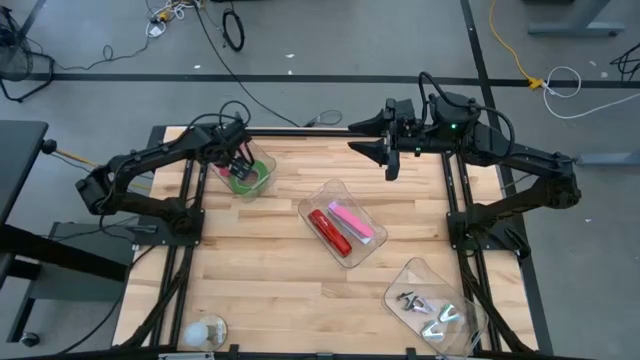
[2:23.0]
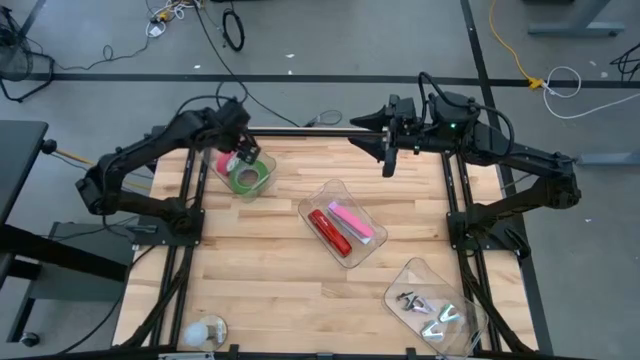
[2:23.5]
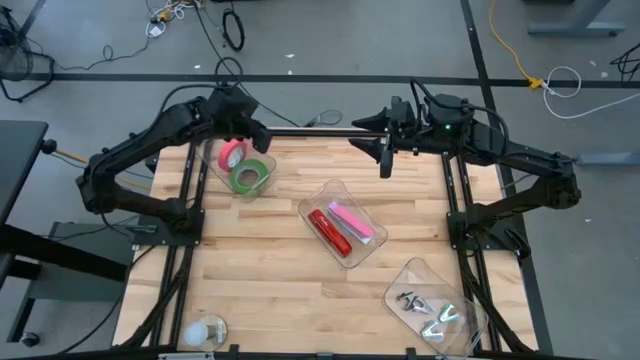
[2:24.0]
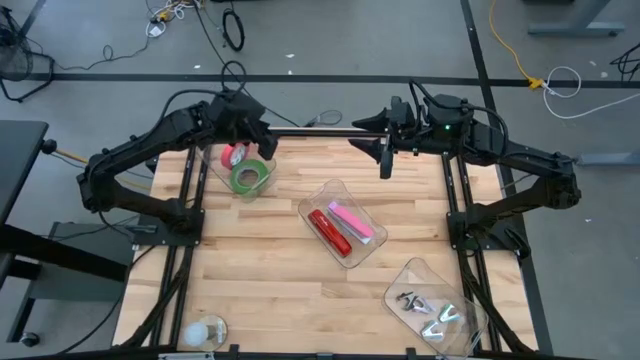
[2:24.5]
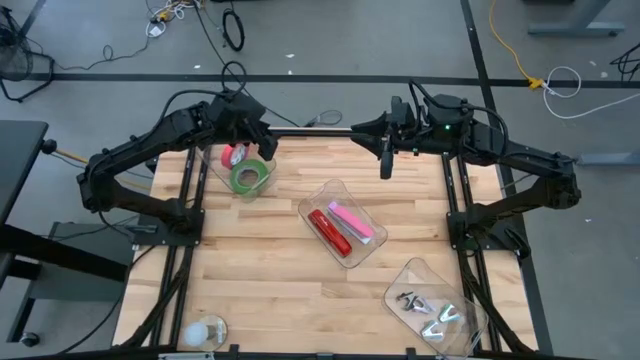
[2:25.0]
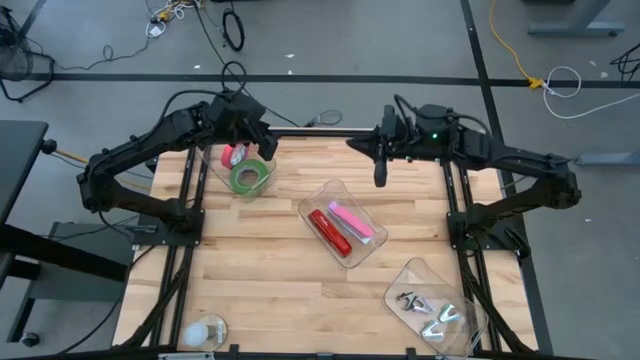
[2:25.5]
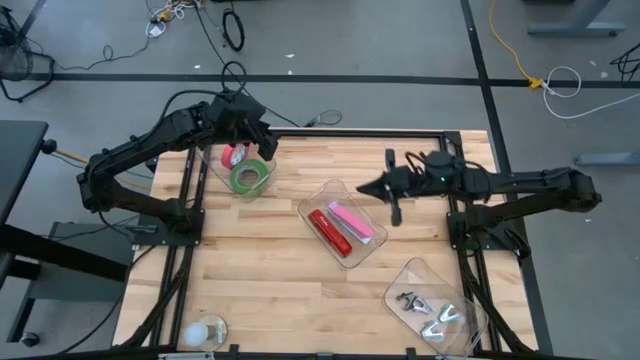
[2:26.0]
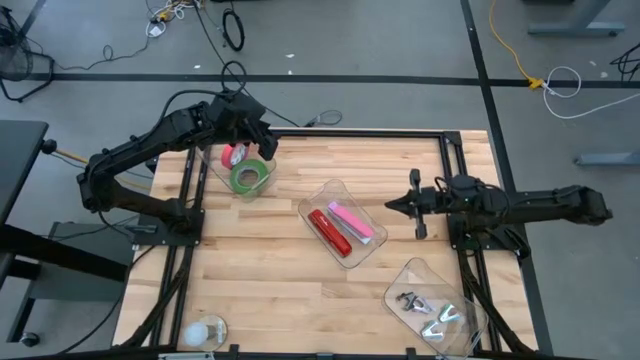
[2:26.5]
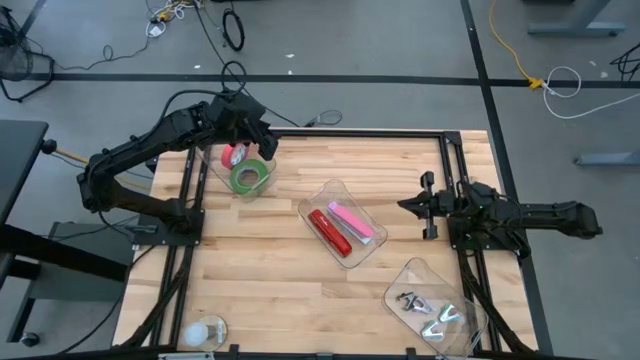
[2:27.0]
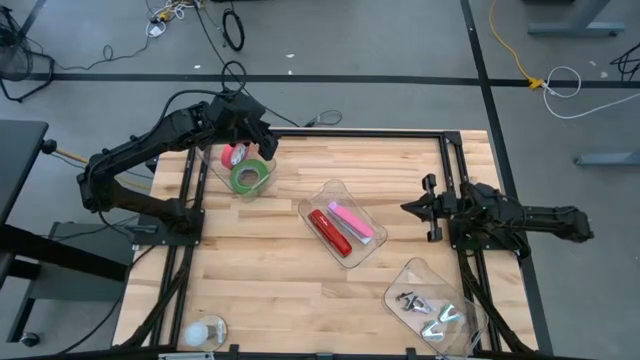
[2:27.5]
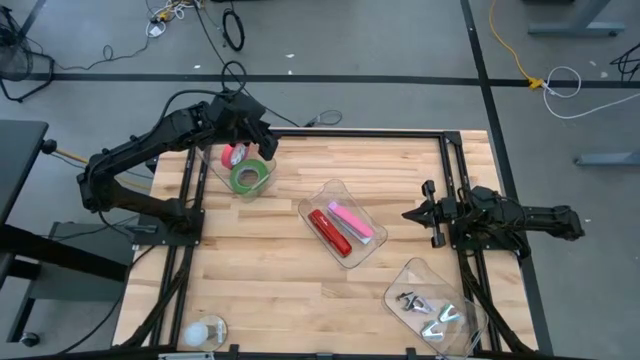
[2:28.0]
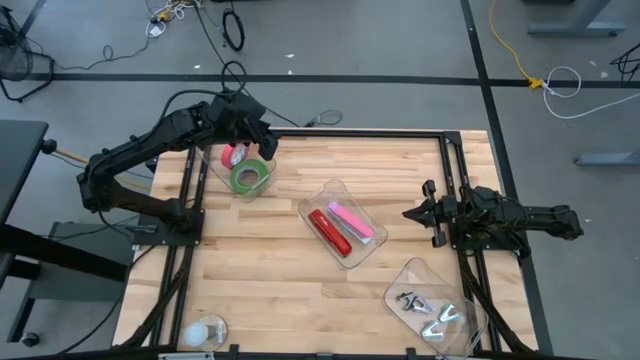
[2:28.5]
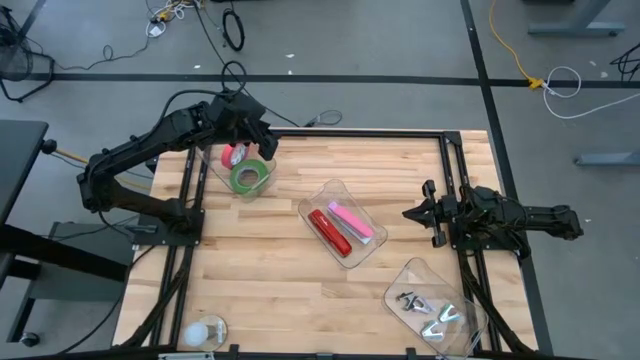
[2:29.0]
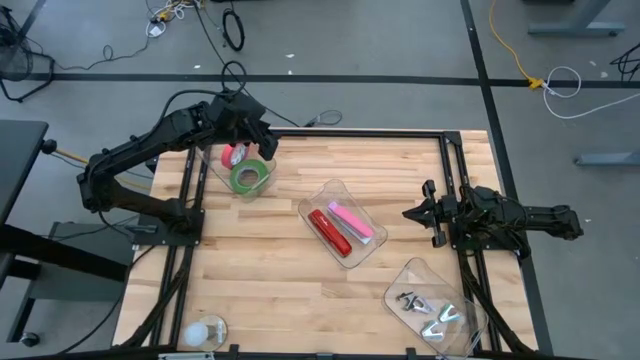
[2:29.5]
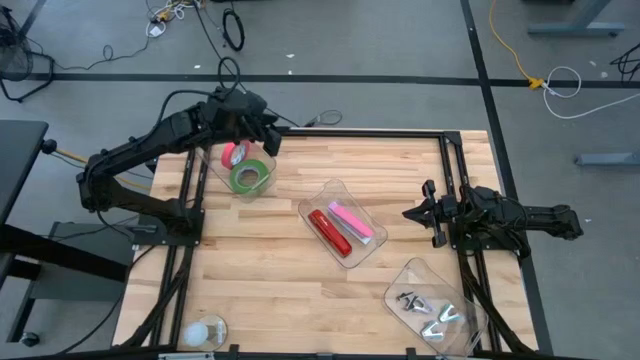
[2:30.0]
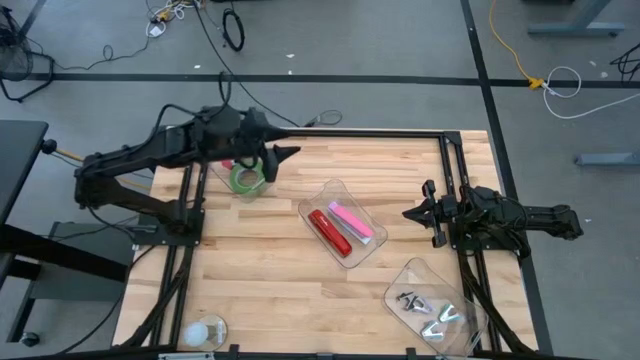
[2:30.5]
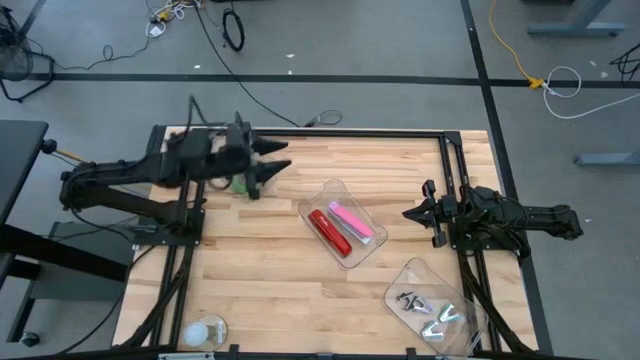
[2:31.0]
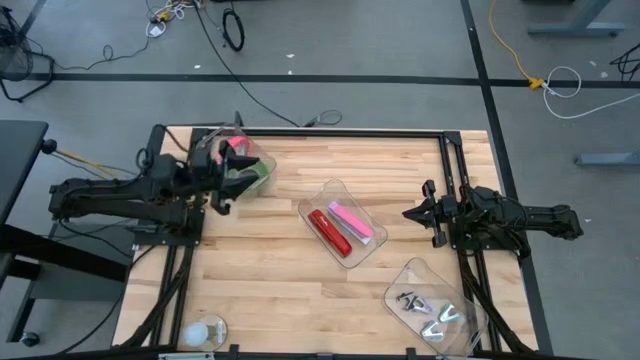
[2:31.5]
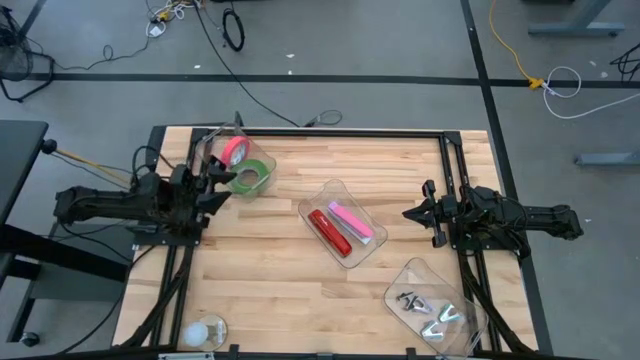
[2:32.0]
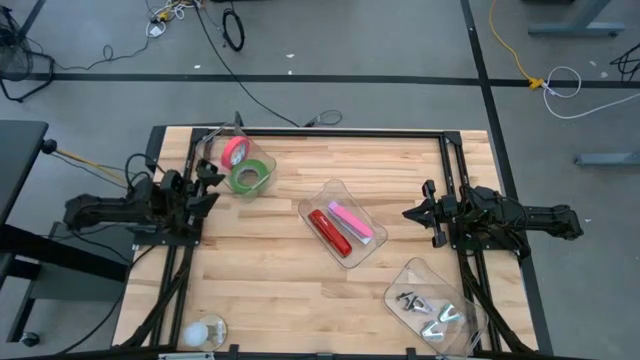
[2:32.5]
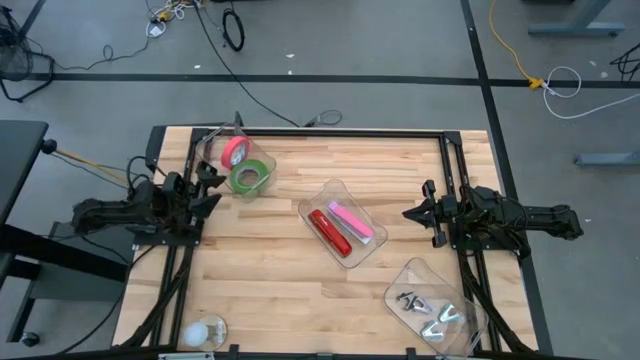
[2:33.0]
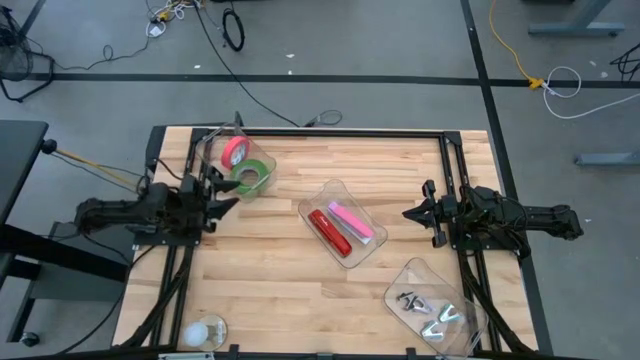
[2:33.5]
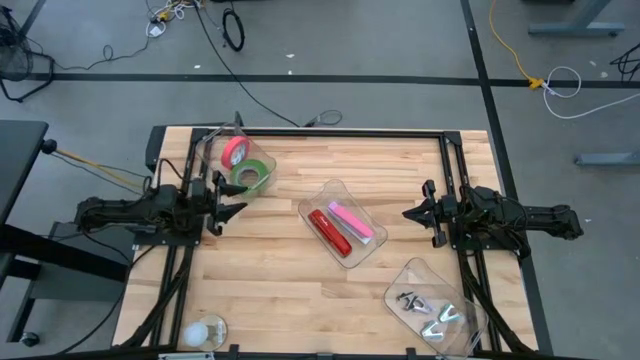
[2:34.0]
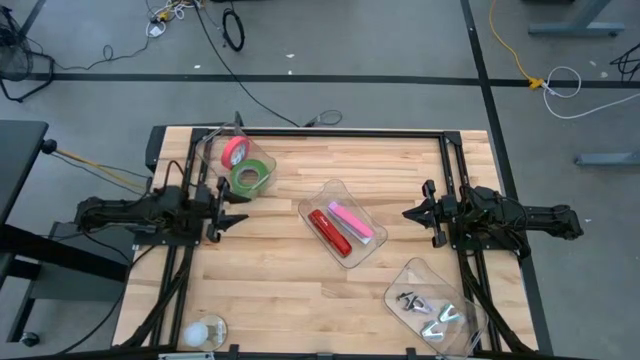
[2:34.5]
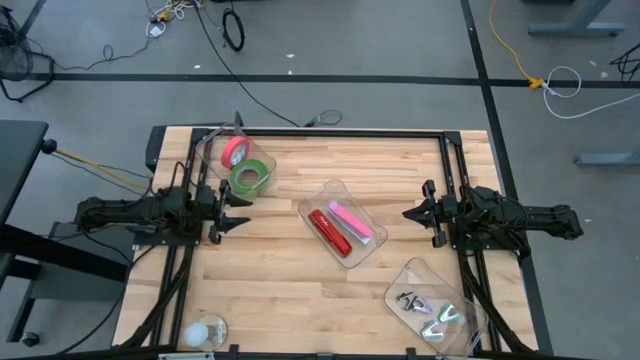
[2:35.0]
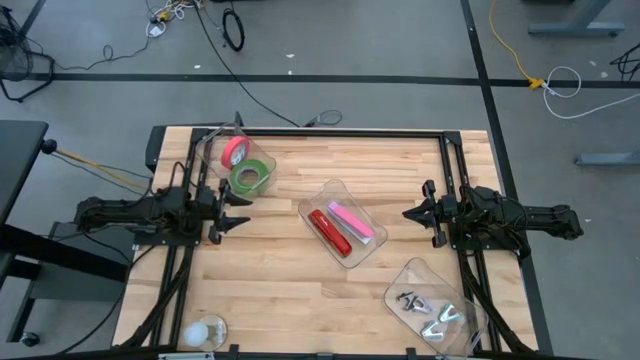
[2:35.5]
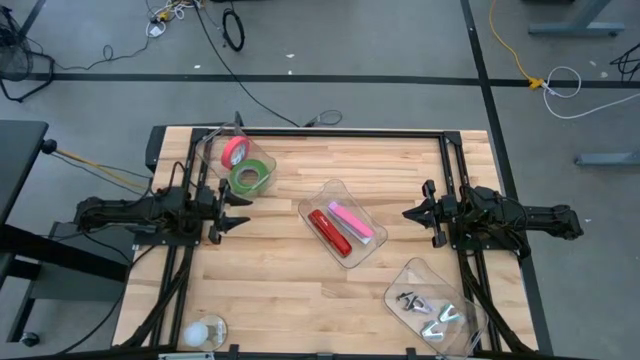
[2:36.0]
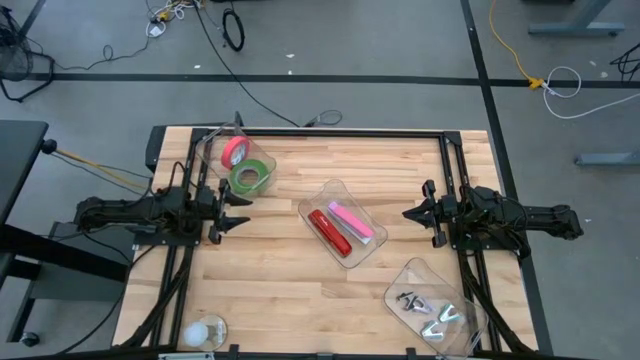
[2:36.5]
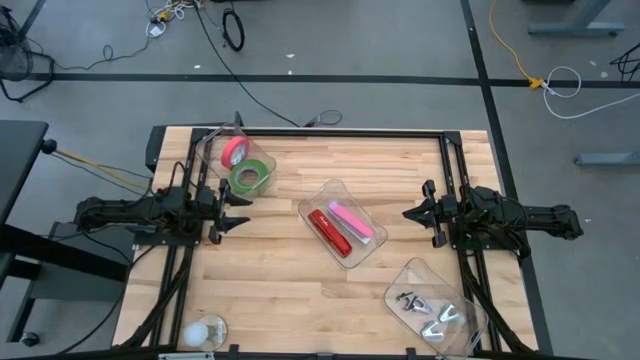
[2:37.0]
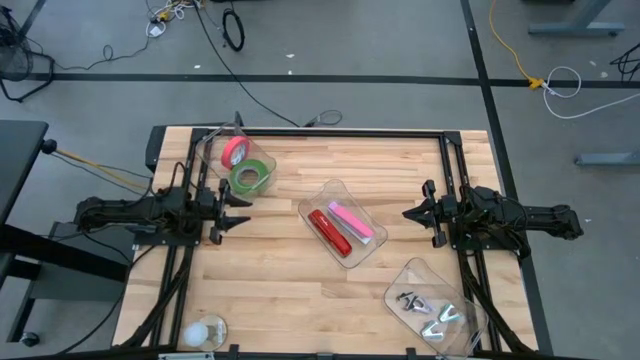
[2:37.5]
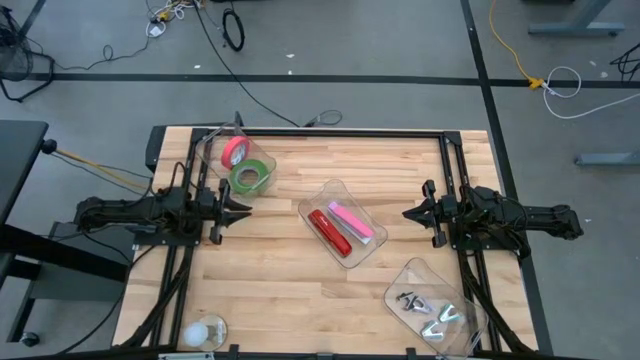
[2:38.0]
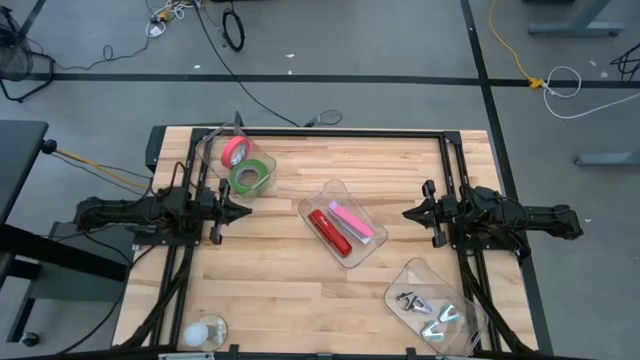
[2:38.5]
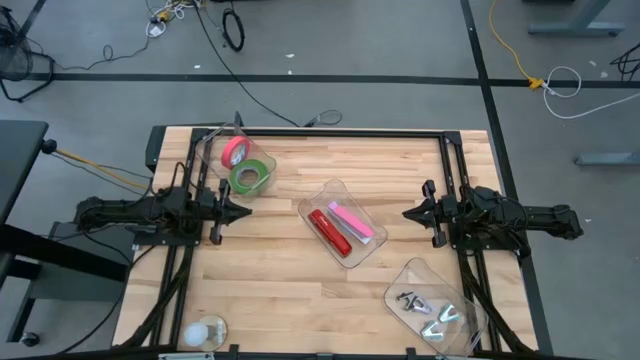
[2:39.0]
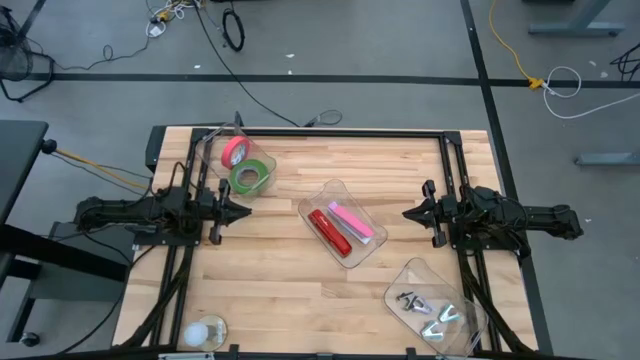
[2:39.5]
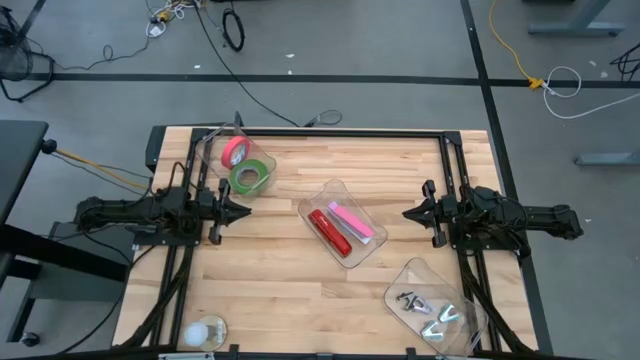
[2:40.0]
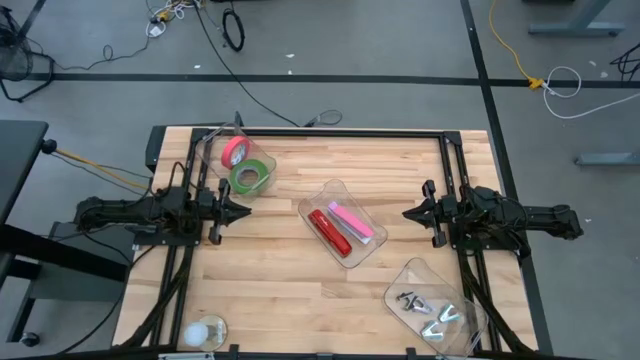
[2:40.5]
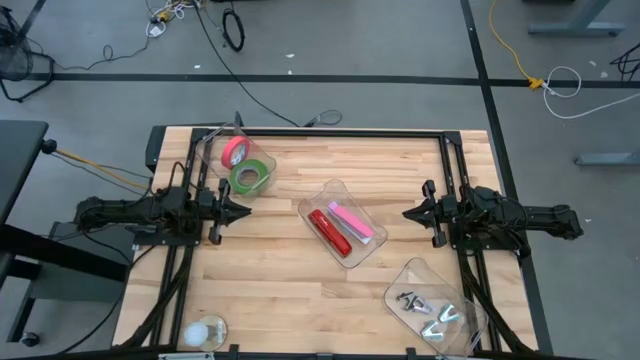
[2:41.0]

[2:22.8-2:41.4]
Task: Pick and place Stapler, Stapler remover, tape
Return to Home Position
